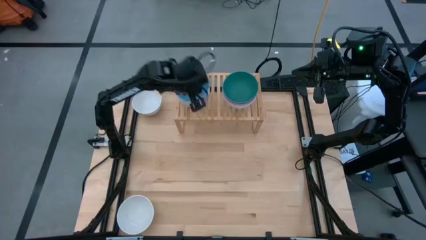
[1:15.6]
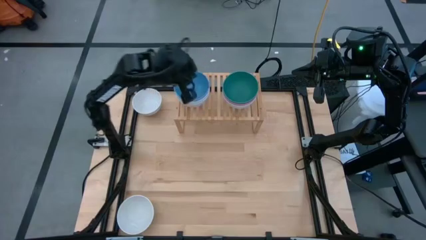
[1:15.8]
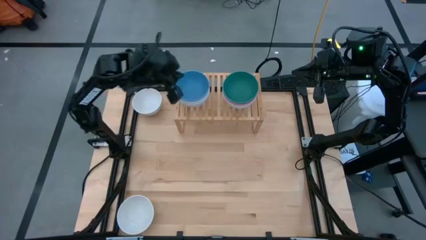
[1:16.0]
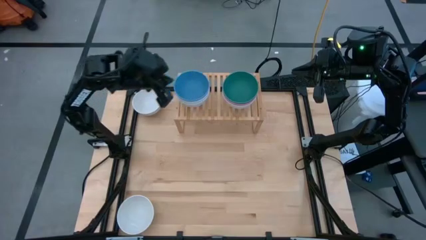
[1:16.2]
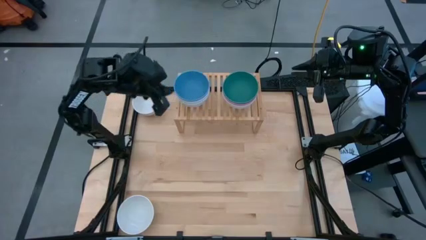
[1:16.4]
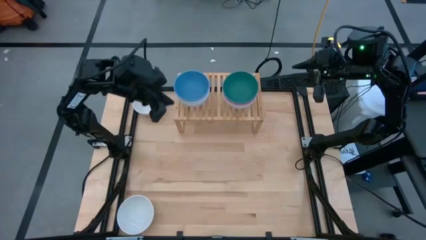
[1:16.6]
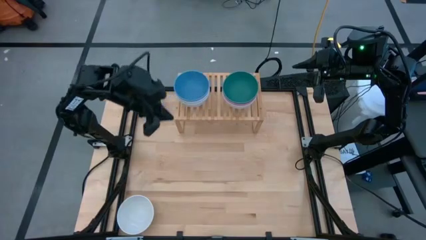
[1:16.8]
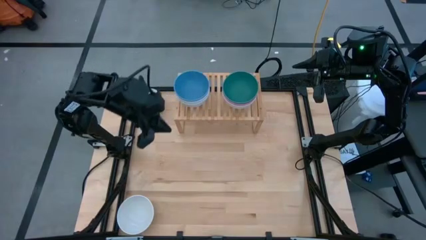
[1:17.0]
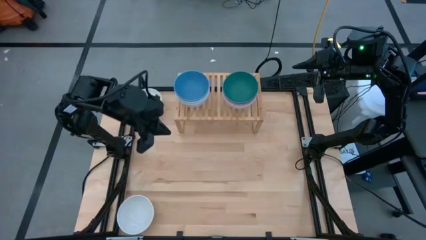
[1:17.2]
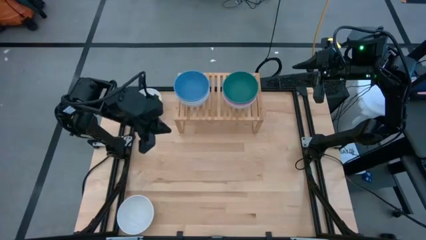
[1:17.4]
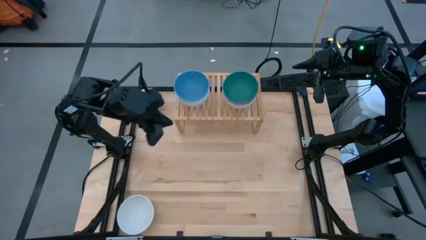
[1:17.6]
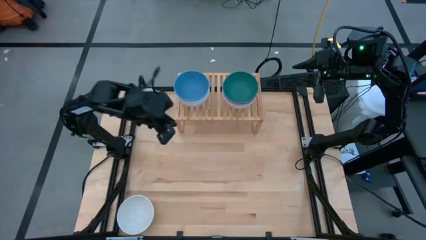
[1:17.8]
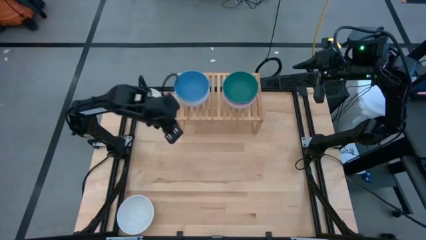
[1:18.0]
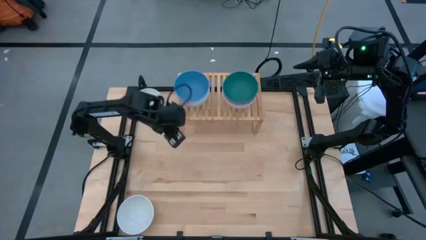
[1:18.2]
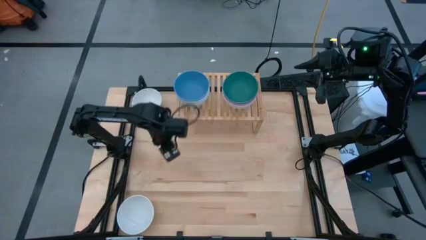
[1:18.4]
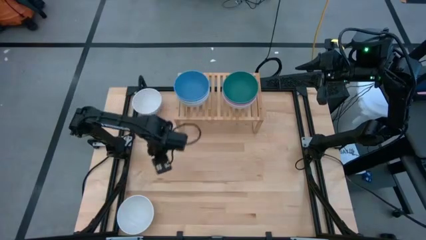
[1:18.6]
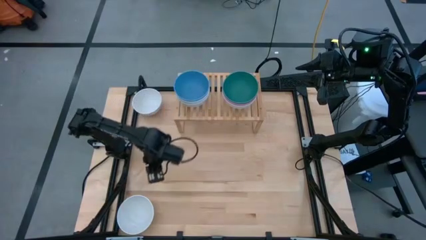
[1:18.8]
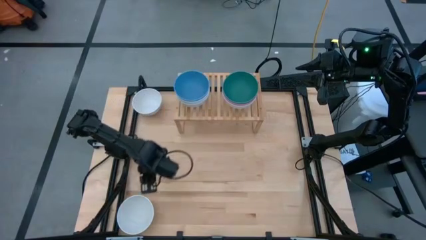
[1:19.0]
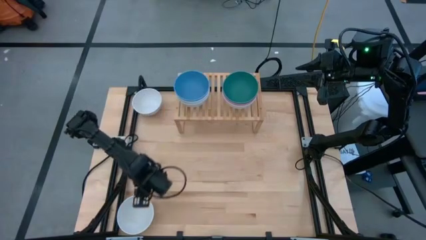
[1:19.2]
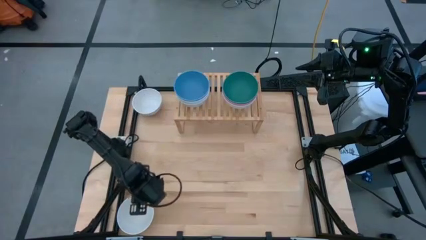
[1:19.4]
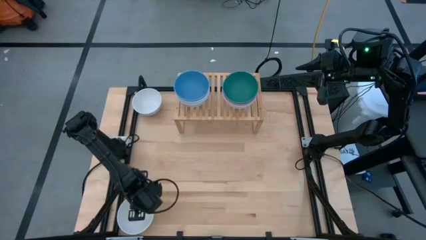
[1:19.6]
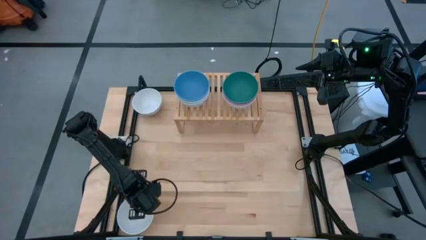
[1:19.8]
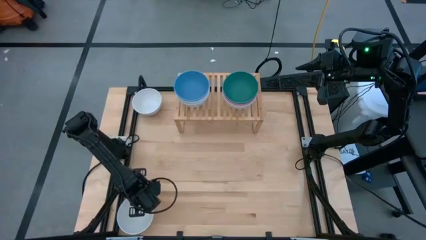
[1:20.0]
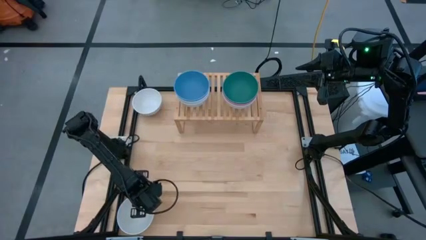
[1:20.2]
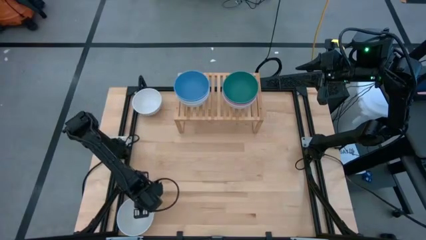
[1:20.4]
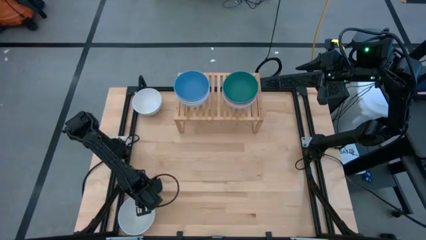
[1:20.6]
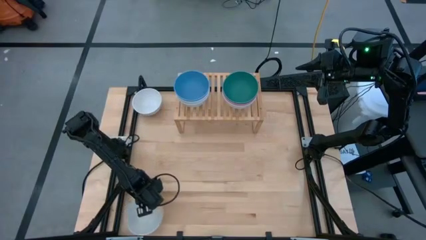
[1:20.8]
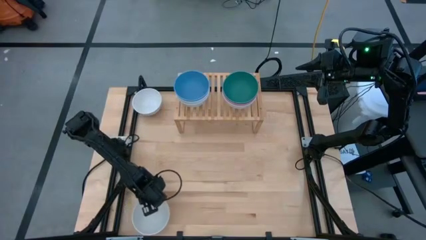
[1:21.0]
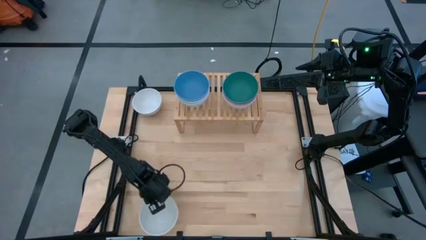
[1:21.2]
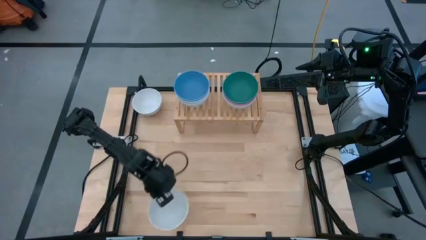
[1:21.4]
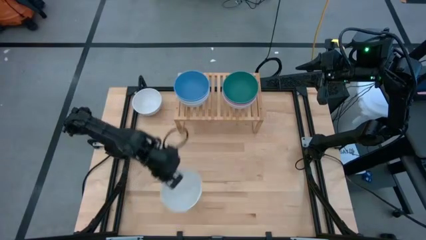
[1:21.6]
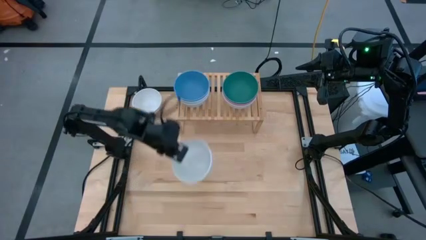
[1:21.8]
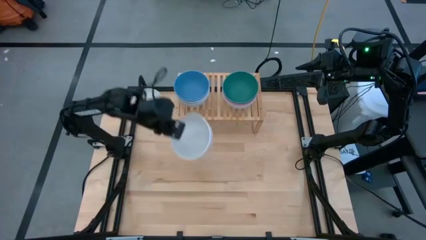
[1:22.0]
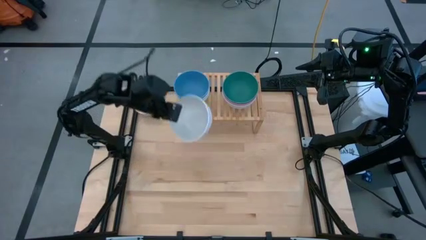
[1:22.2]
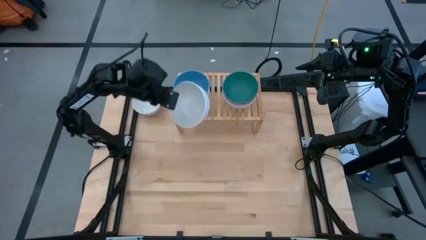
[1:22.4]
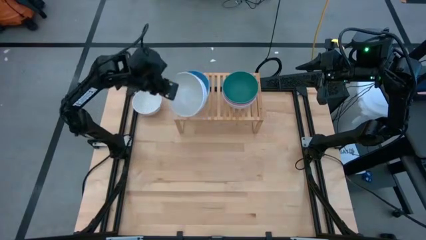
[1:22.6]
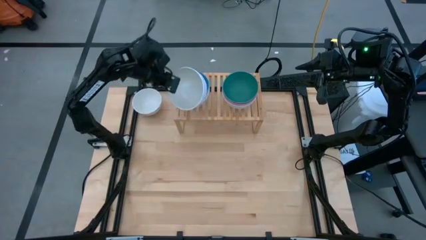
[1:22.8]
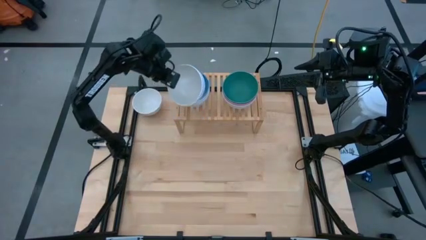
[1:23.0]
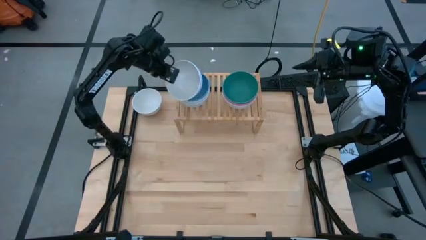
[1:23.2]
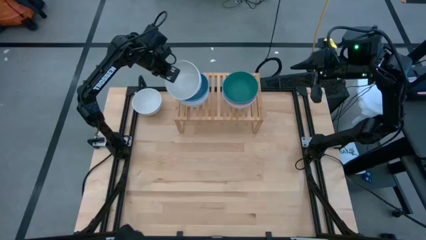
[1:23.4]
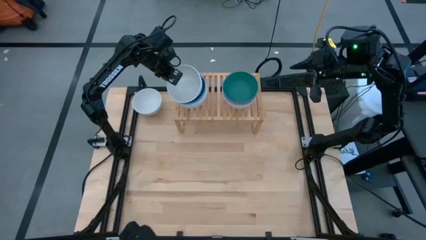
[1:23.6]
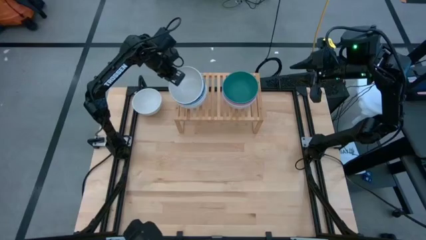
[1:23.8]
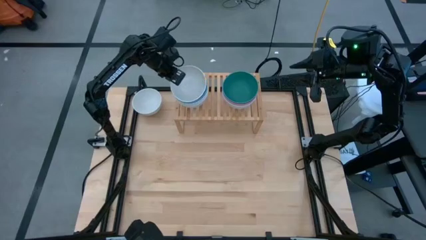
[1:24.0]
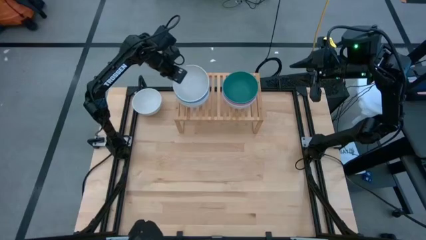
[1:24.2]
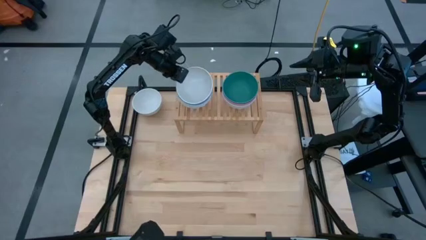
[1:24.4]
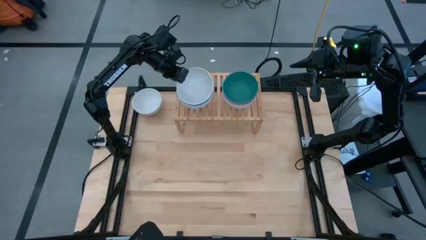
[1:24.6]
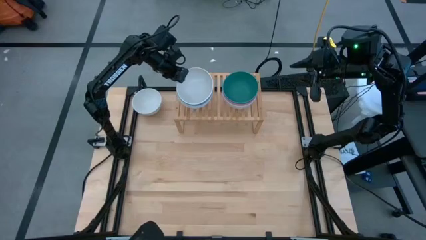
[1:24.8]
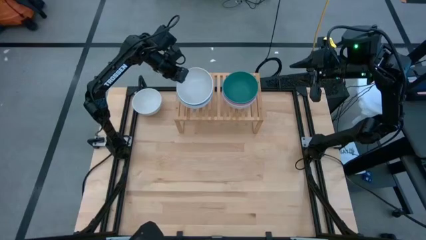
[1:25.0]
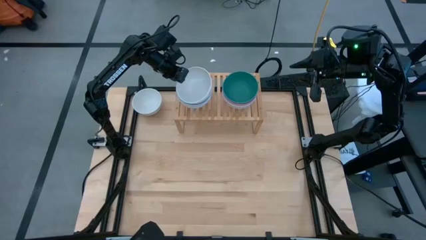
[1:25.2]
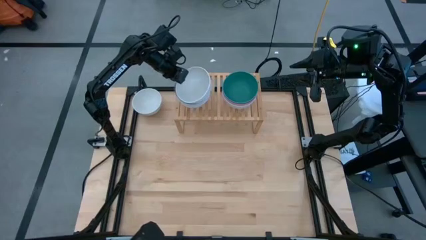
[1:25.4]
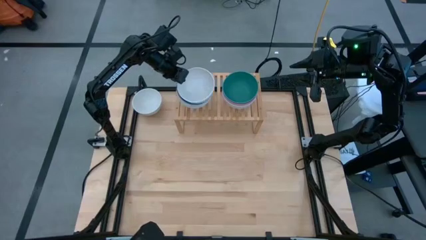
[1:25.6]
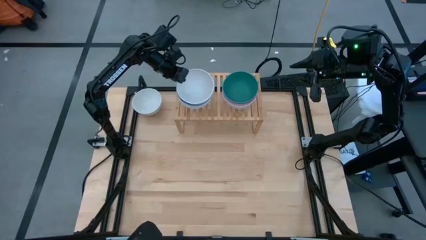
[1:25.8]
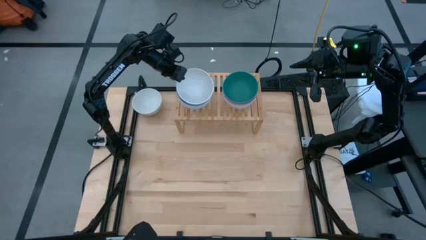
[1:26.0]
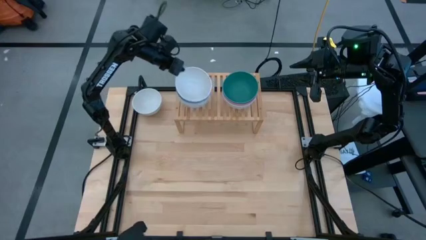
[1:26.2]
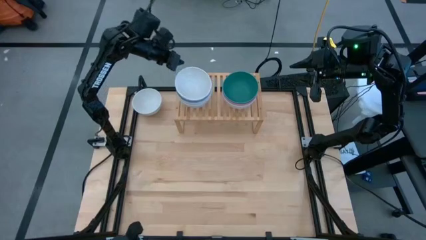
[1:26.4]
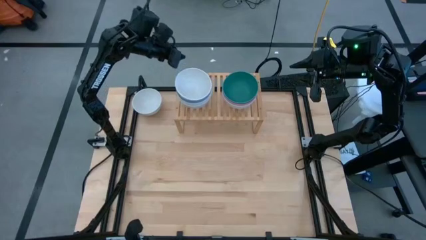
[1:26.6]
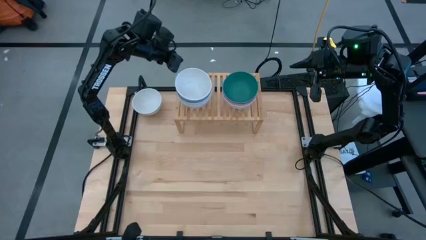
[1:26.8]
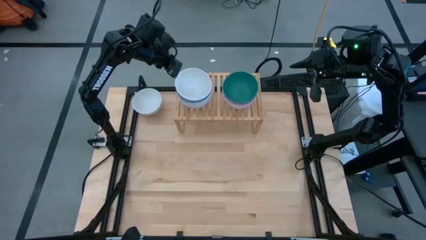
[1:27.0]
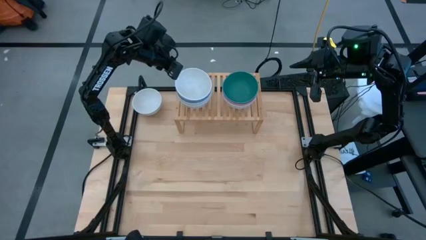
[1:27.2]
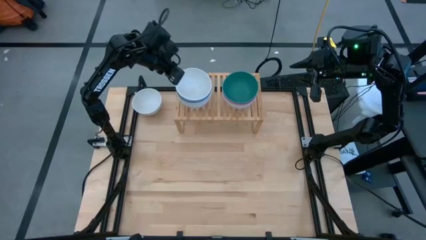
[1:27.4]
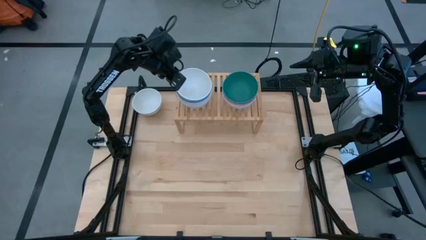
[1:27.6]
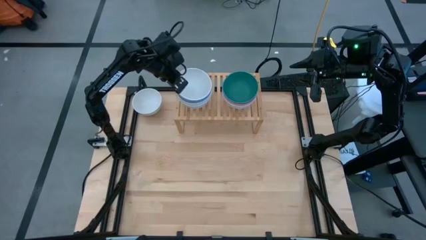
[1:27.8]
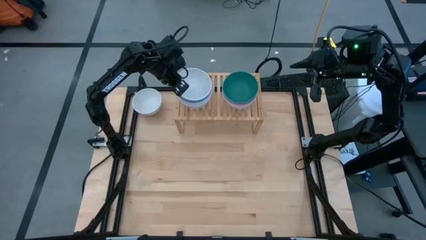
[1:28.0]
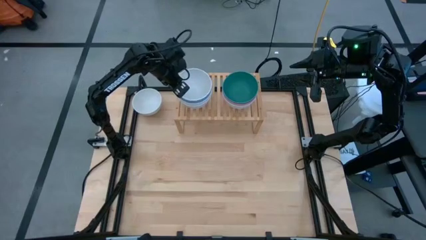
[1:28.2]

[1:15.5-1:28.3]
Task: Place and stack bowls onto a shelf
Stack the white bowl on top of the blue bowl on the shelf
